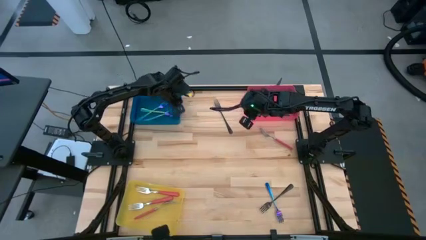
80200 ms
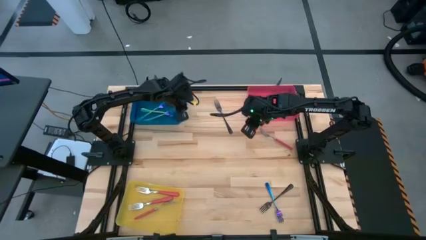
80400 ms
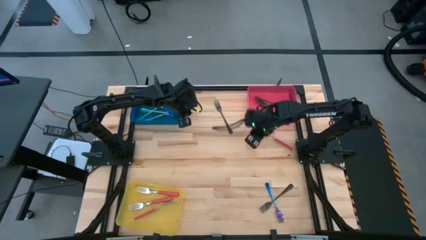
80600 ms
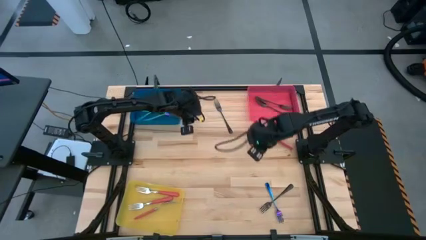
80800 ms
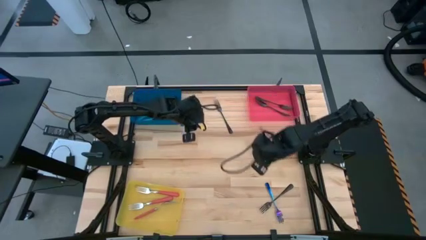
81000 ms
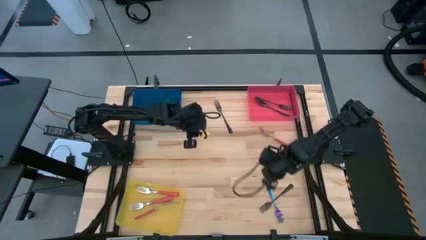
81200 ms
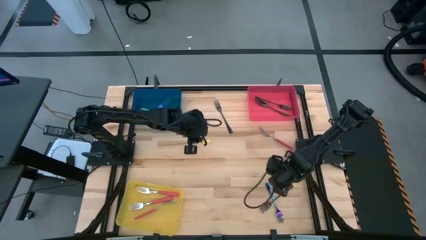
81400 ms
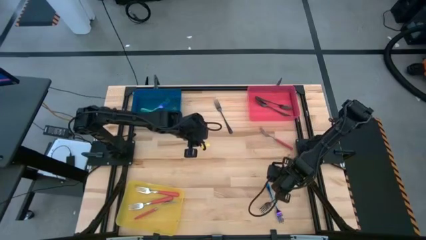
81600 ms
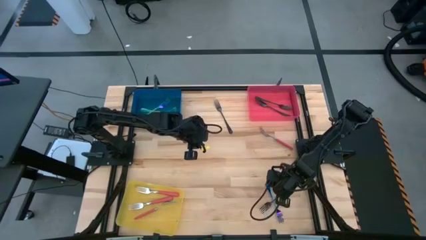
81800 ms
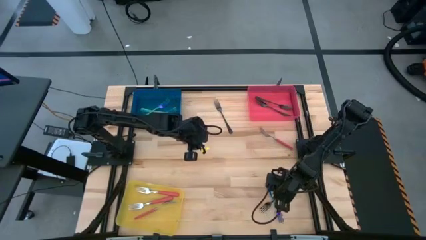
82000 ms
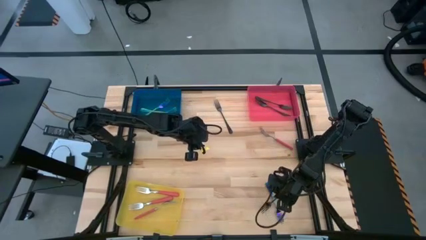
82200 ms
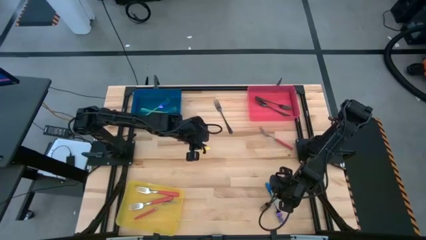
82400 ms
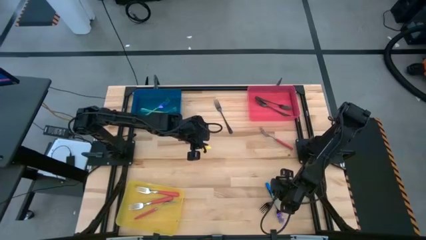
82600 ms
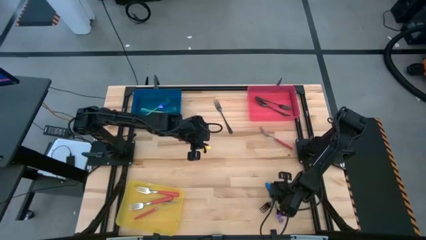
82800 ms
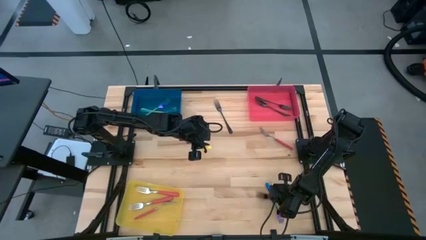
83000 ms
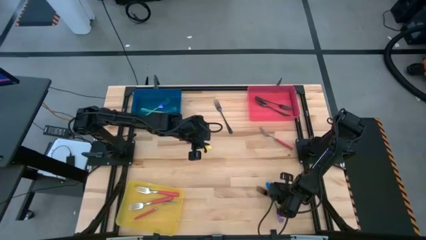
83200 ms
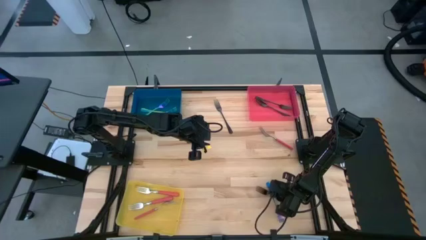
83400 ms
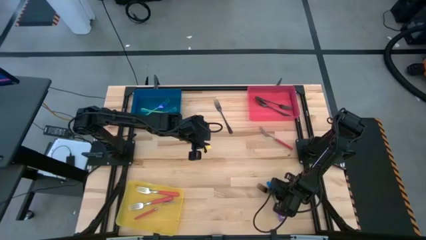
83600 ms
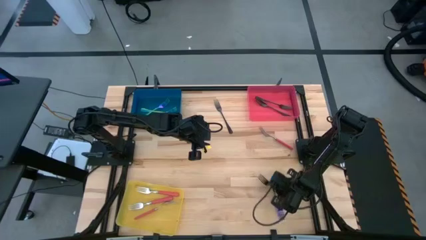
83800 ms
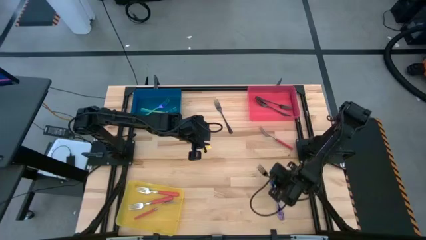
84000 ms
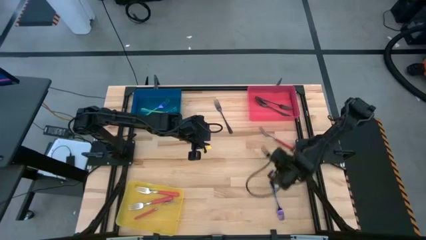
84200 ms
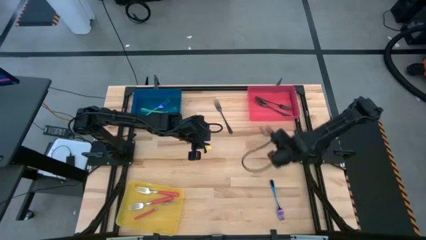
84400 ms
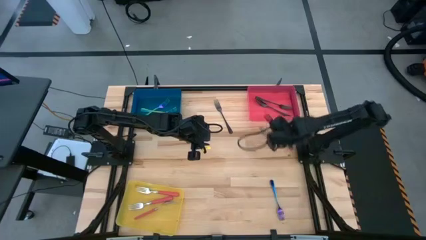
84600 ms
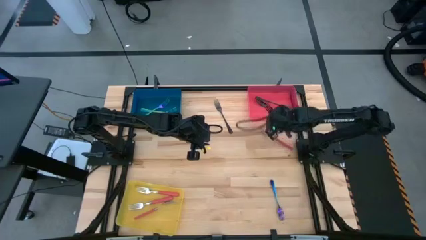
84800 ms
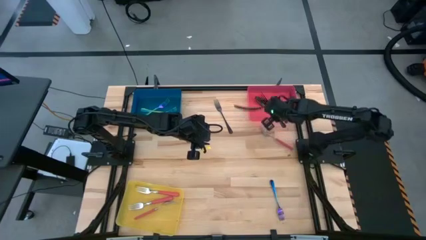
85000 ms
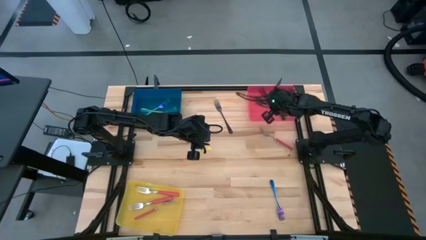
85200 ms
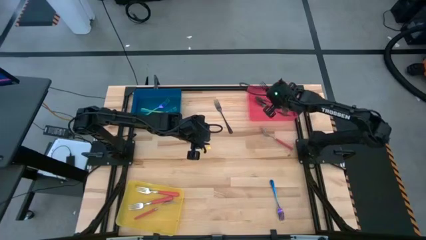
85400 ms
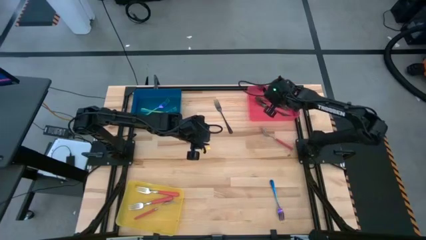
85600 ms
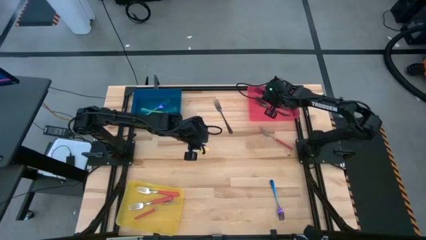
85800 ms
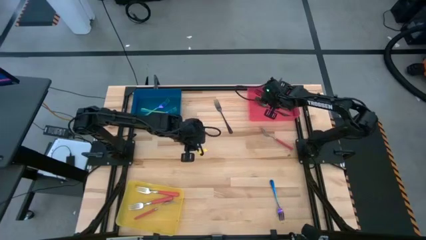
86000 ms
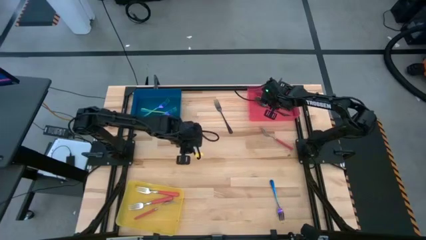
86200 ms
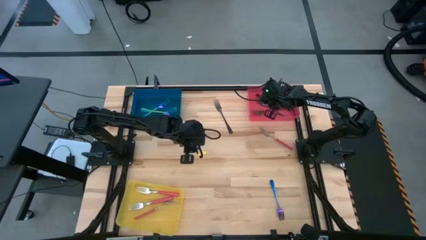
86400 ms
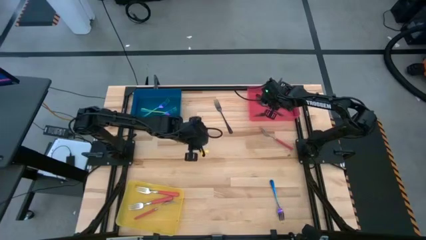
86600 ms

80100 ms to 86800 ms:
Task: Sort silverware by color (type)
Put the bottom black fork into the red bin

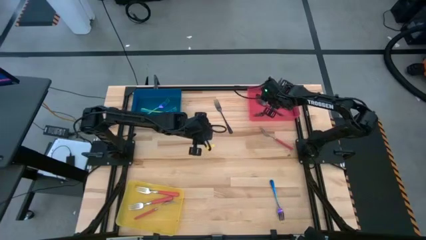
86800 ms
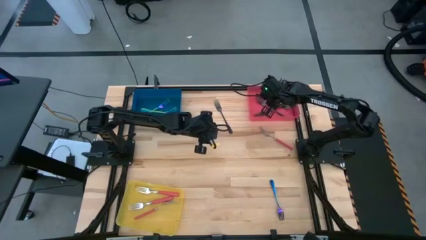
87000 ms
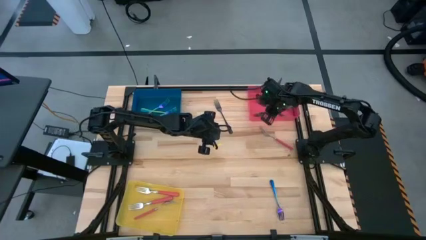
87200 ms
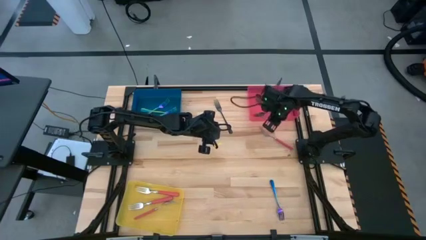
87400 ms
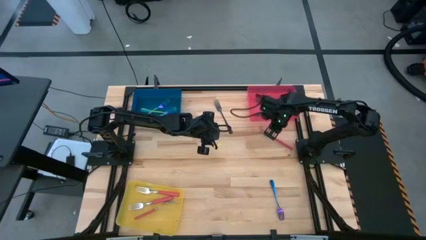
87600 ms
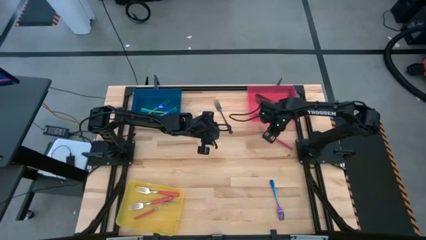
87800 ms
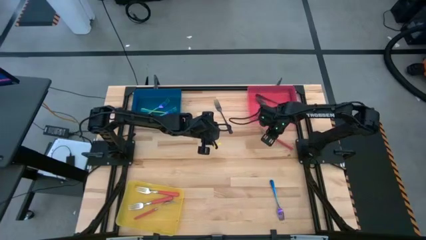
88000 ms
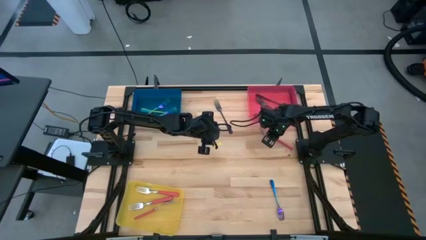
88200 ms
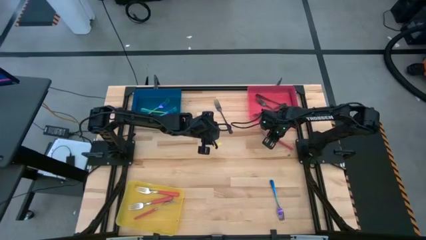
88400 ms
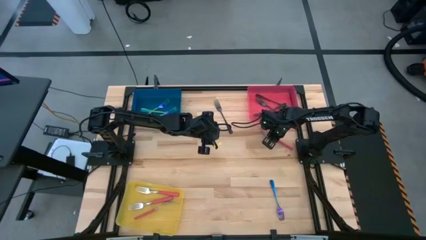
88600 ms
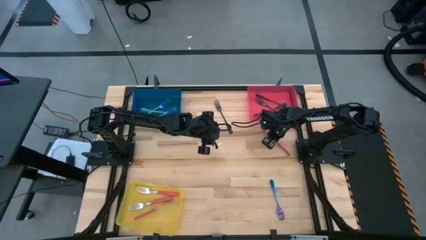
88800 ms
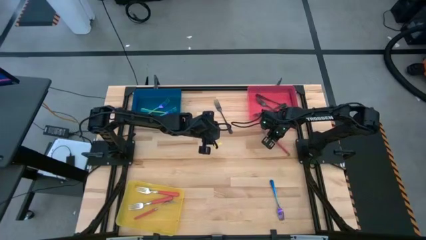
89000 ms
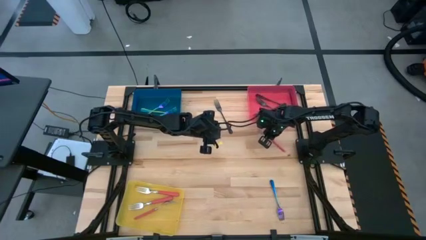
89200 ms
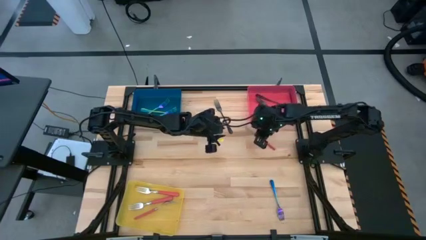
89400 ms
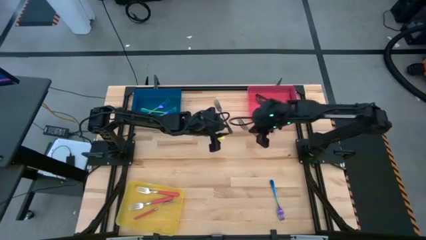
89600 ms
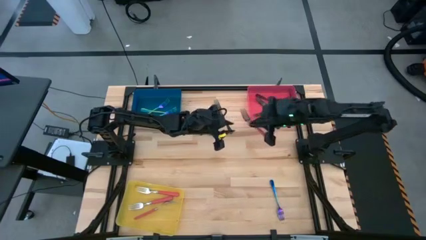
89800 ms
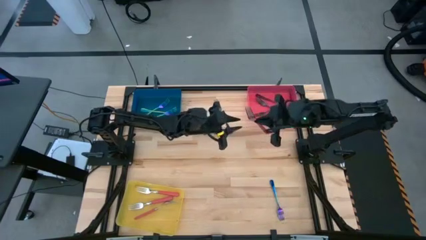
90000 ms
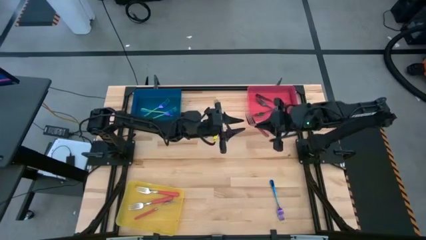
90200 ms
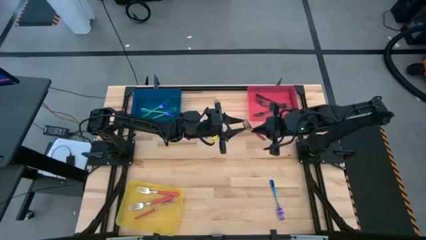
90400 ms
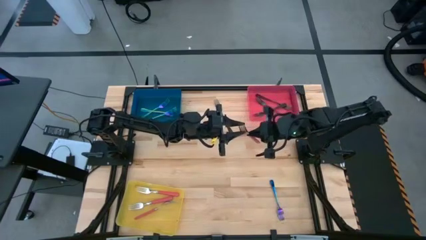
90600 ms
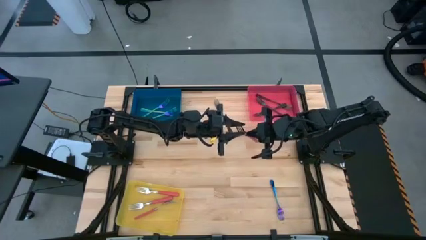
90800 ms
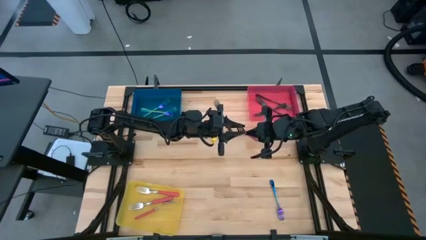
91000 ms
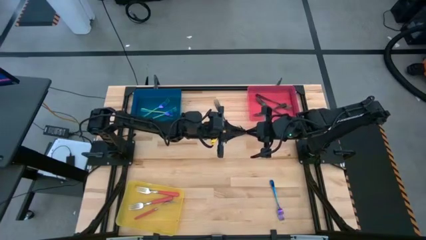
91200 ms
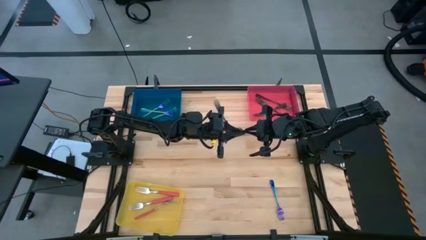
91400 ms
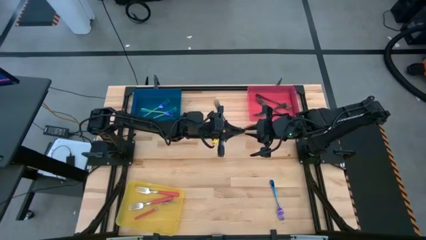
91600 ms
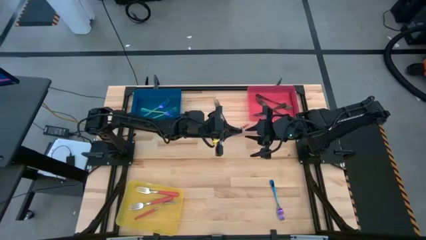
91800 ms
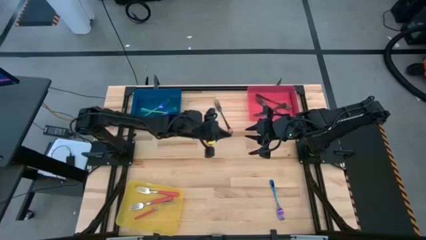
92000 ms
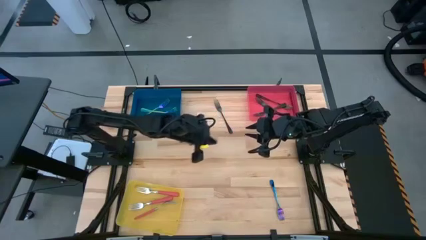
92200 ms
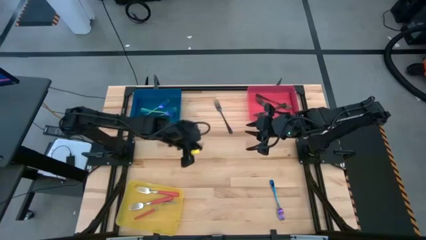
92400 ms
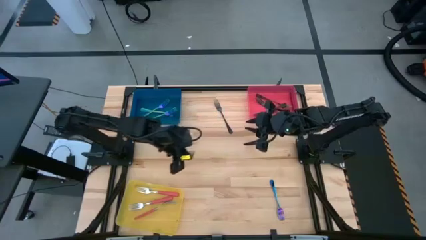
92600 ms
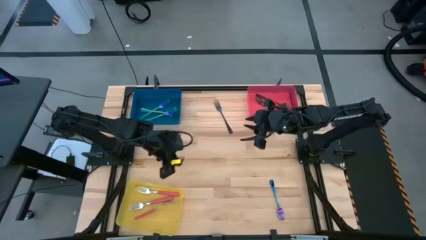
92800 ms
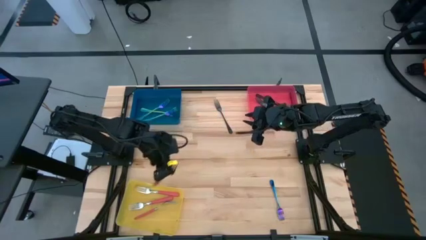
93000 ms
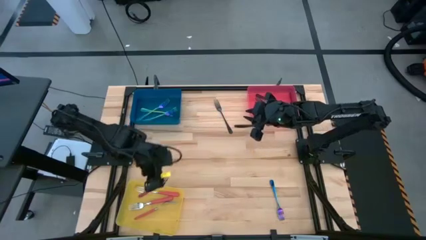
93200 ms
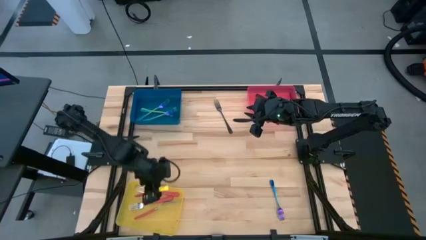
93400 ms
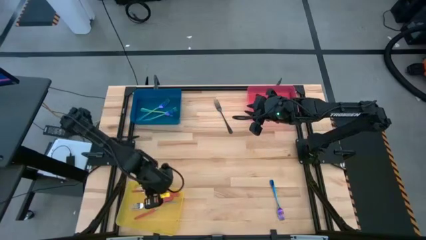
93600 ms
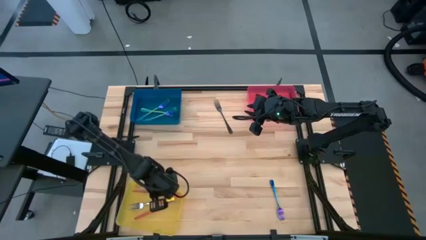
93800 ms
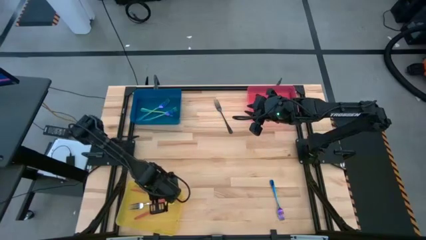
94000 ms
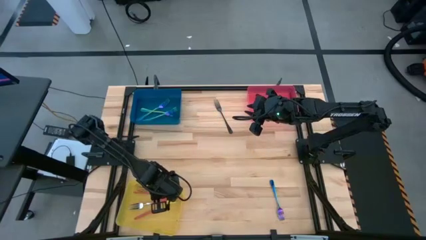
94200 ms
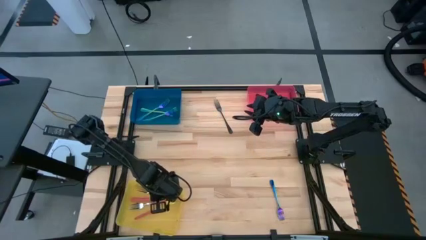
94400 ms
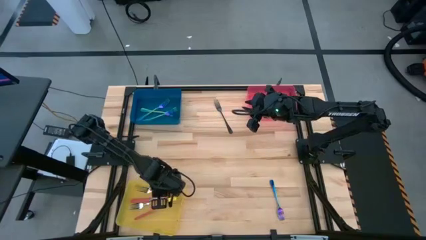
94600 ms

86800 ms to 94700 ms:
Put the pink fork into the yellow bin

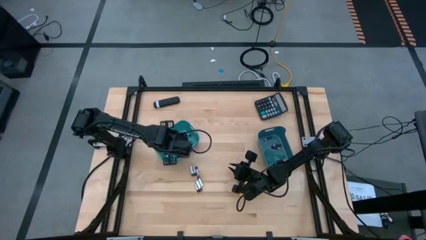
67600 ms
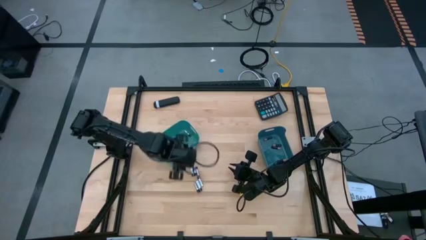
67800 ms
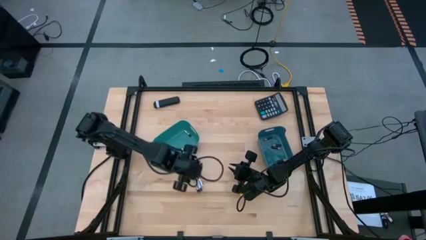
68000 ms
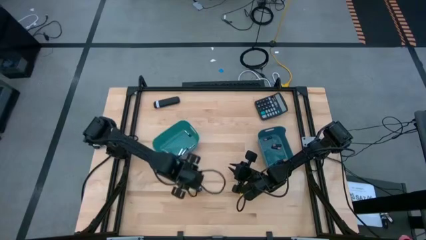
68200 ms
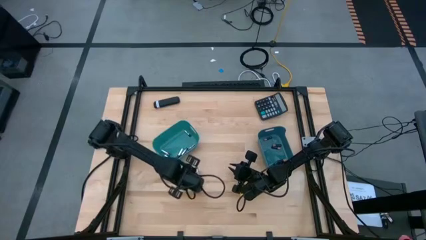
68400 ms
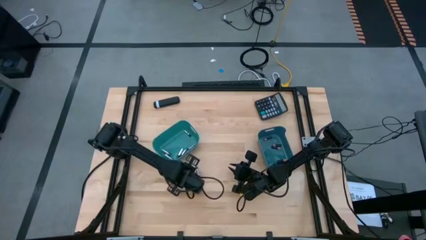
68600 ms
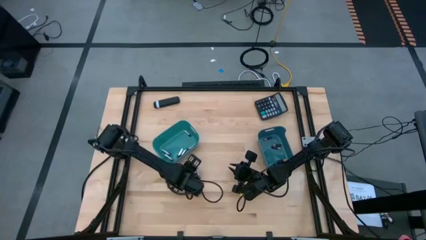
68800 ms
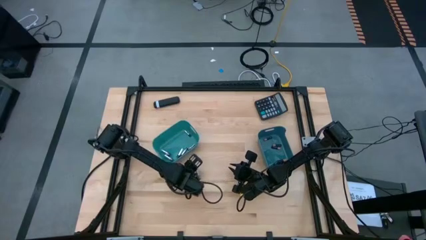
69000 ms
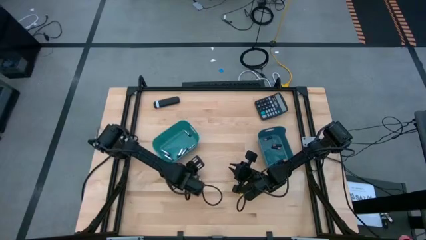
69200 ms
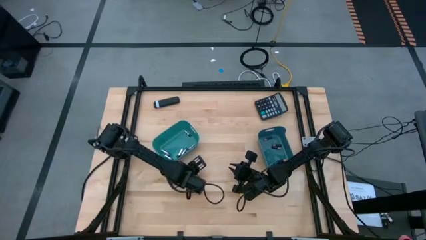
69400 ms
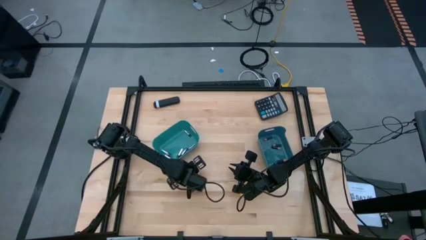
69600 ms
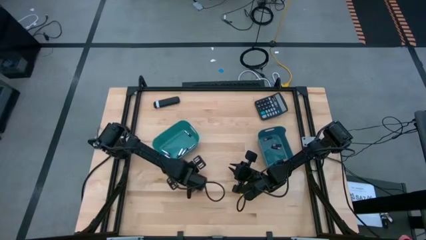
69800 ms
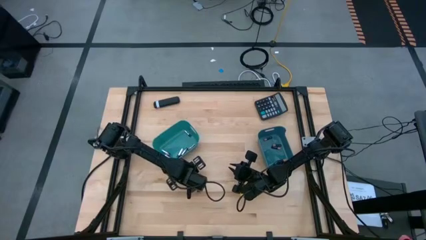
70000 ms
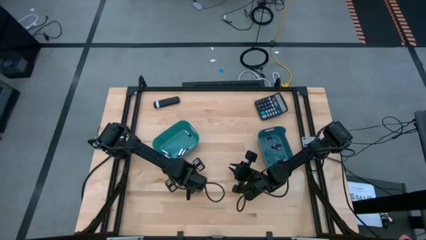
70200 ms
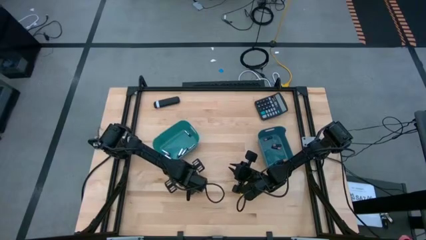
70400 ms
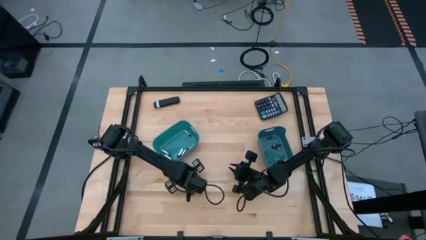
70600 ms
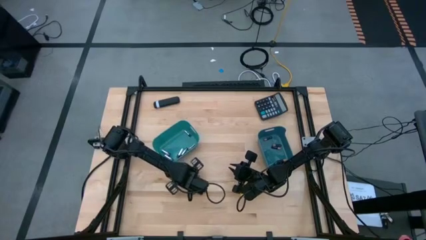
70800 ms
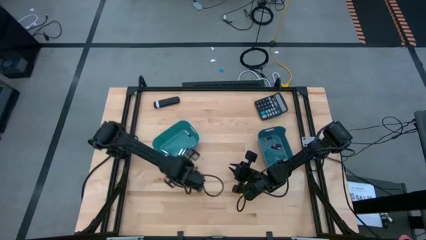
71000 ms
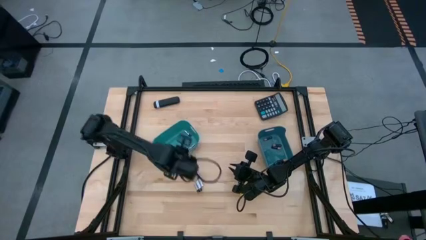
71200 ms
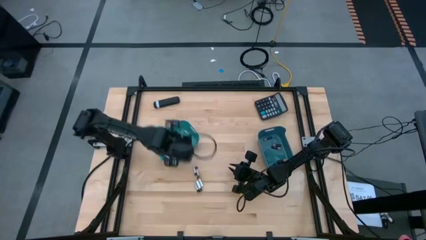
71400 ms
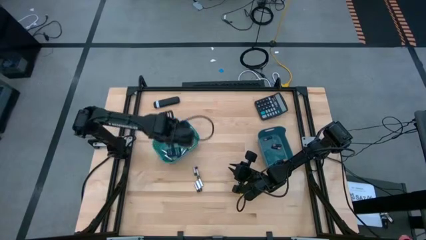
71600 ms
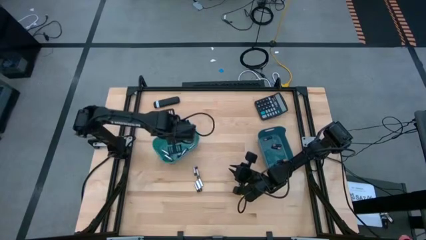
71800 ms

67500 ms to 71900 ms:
Task: Sort batteries
Put the white battery into the green bin
